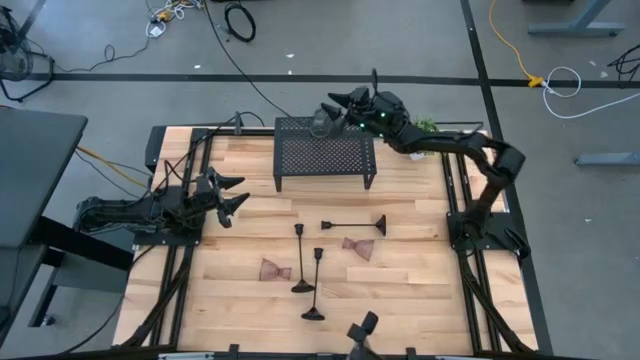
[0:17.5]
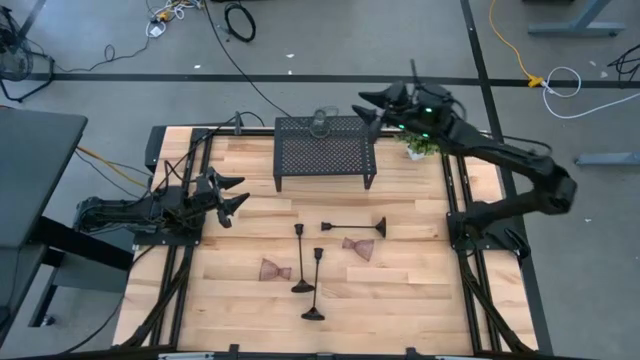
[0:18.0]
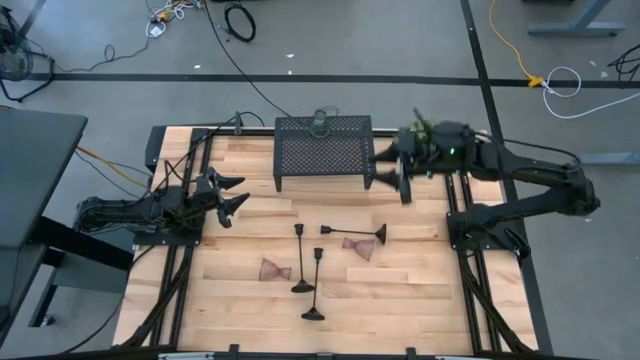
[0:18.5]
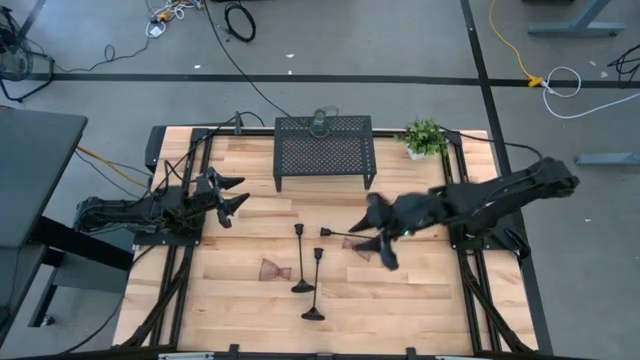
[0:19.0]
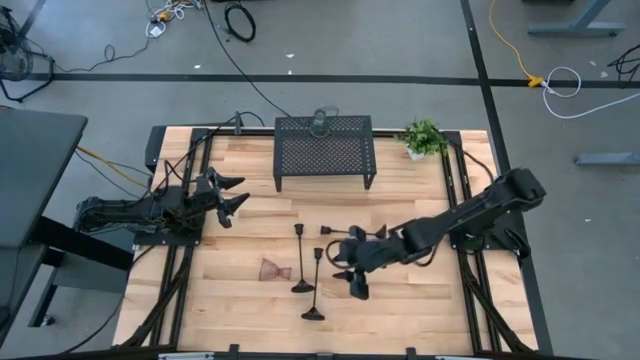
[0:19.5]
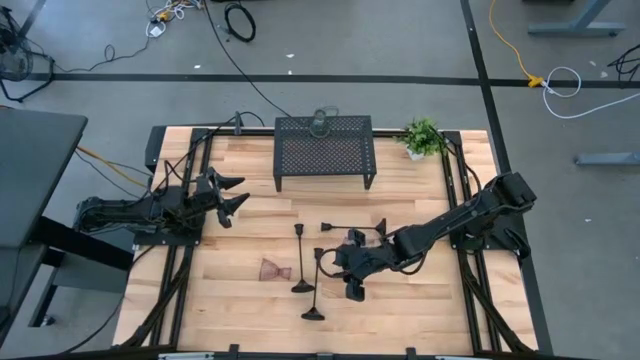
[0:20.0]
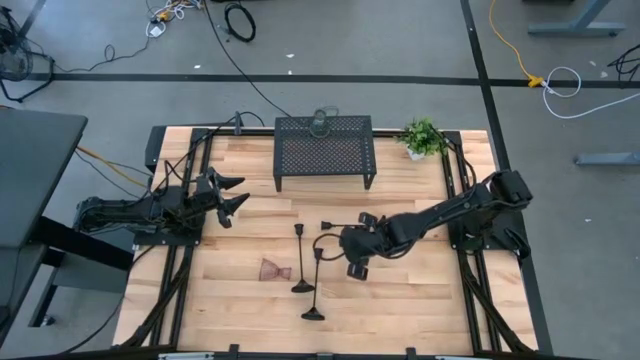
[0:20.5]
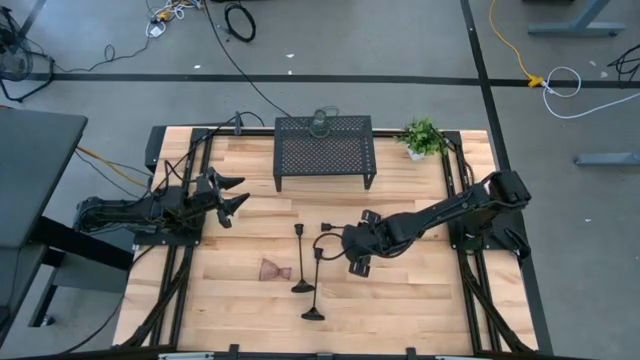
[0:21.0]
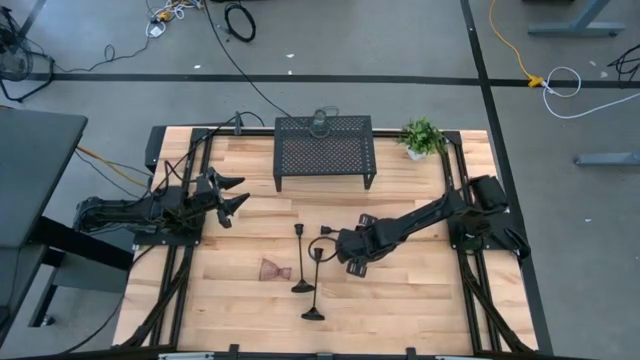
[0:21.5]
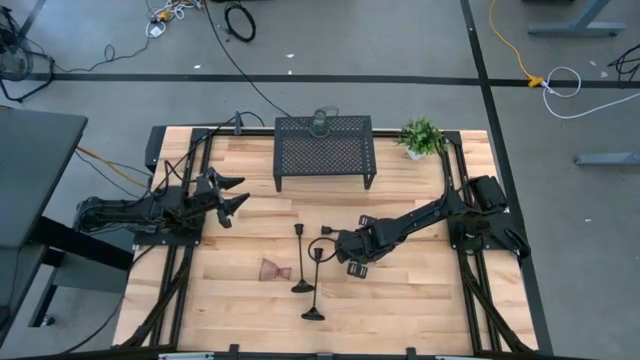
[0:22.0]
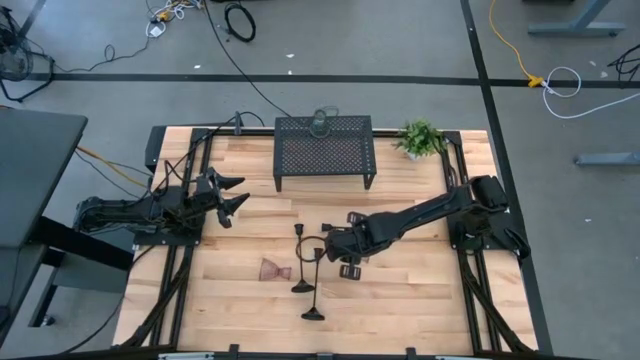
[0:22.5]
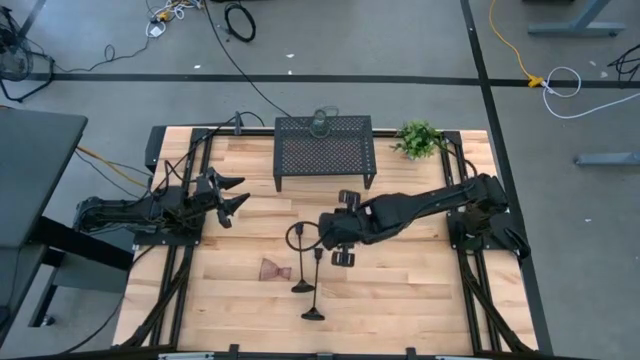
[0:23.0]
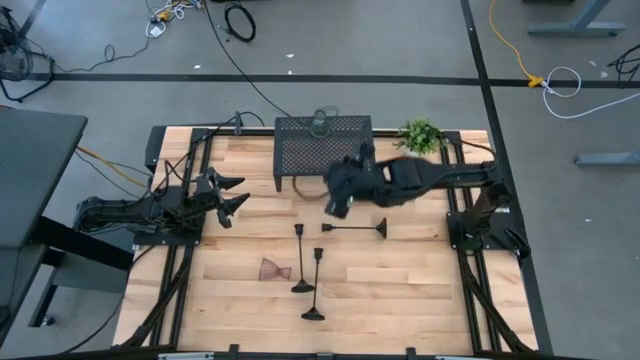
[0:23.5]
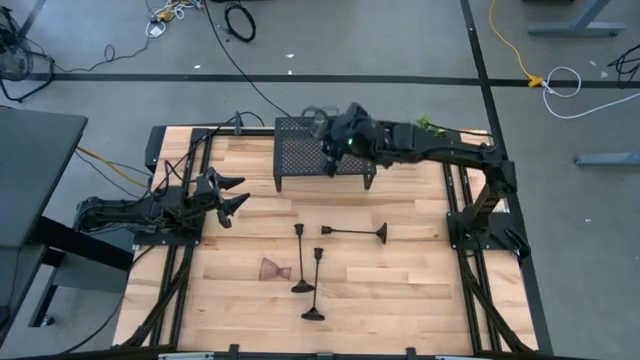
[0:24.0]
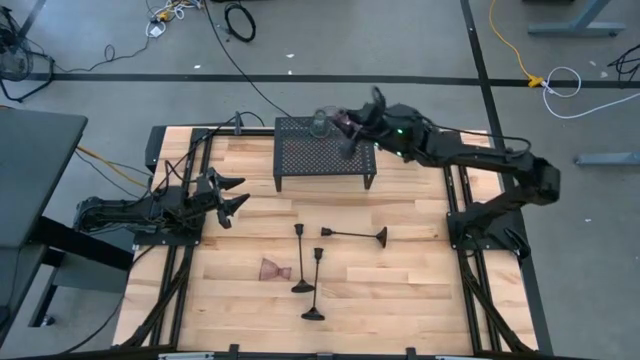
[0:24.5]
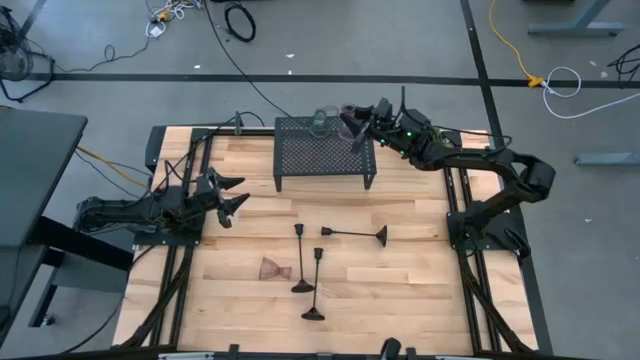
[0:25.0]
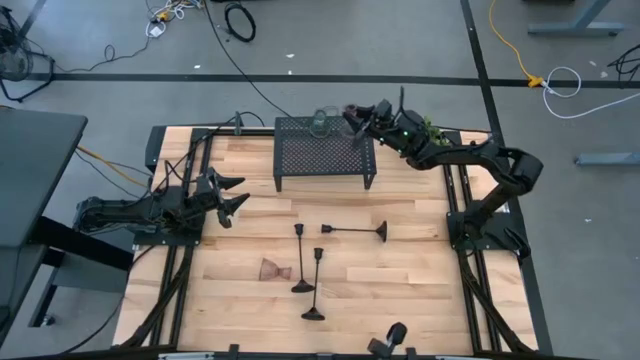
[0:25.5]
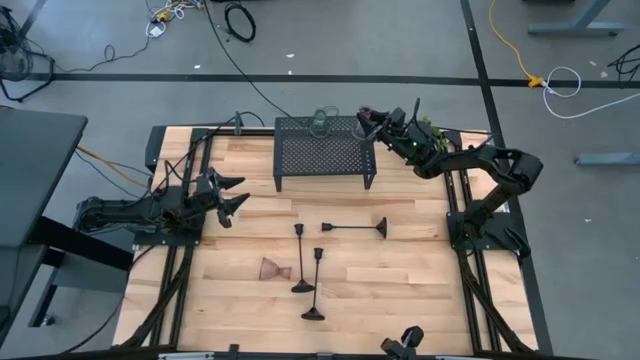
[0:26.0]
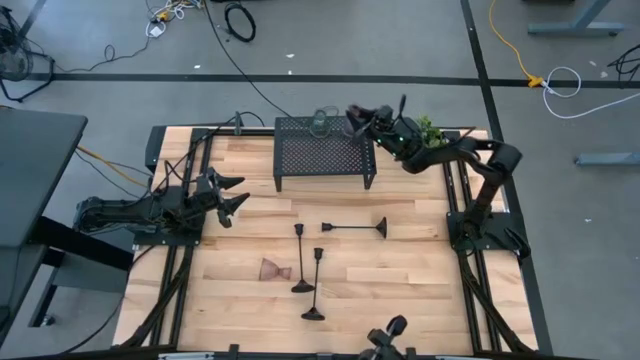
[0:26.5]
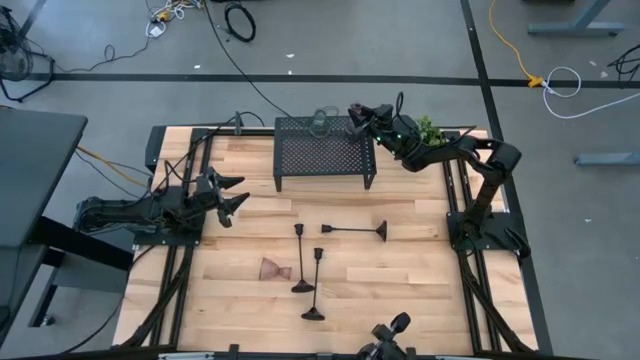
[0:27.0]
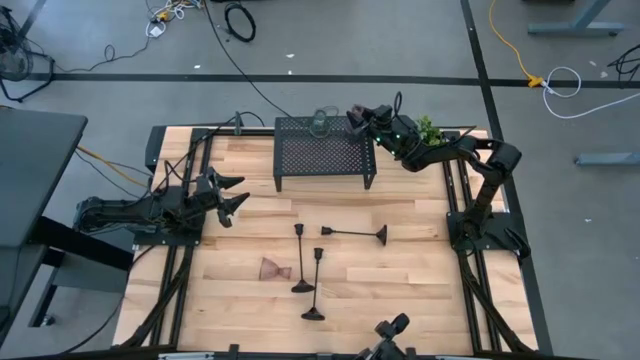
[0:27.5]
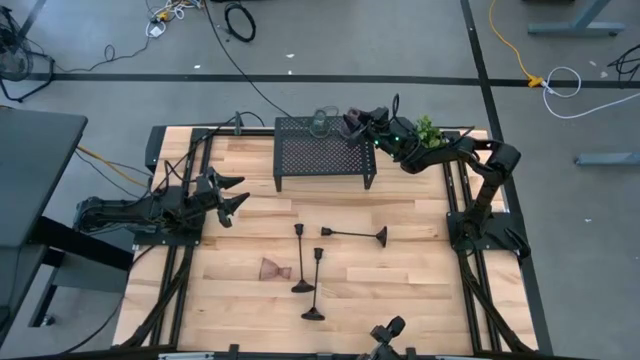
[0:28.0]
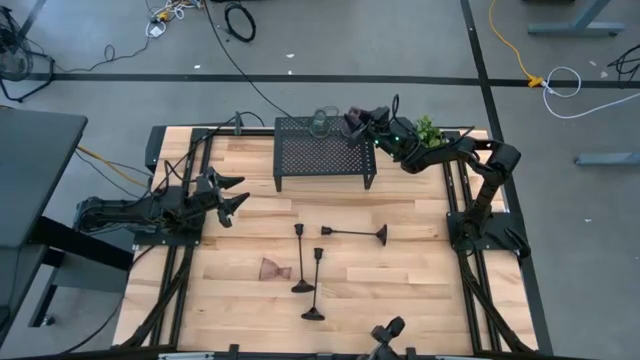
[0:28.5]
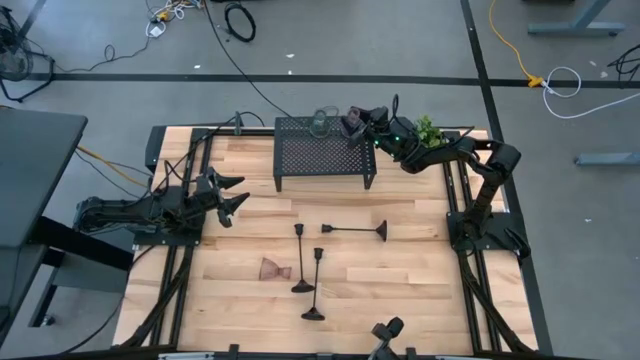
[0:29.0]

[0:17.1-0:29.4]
Task: Pick & Place candle stick holders
Put the right pink glass candle holder on the shelf

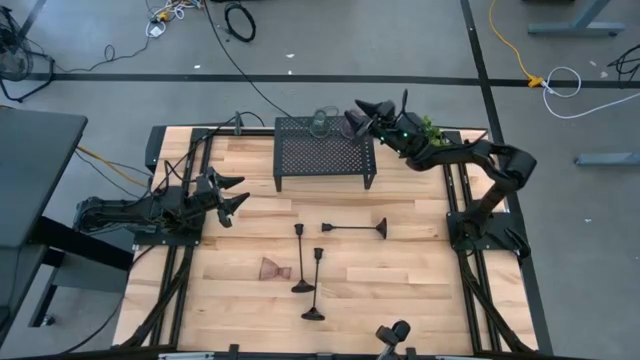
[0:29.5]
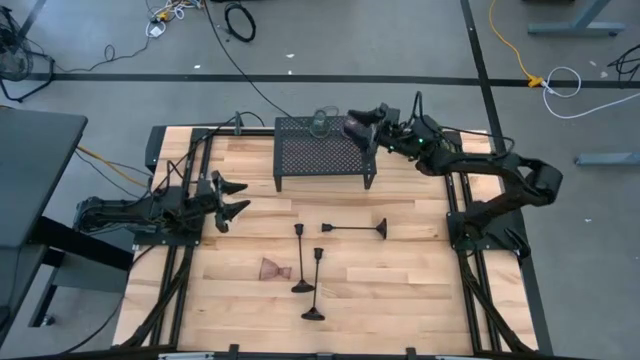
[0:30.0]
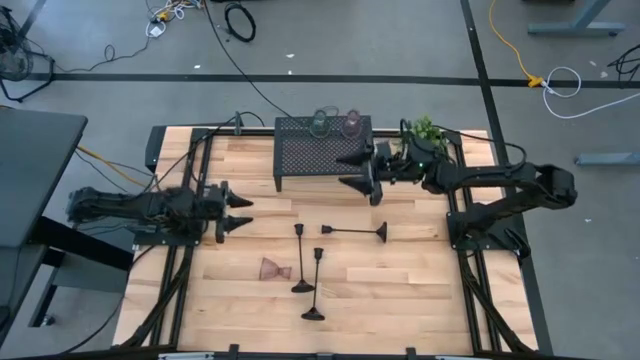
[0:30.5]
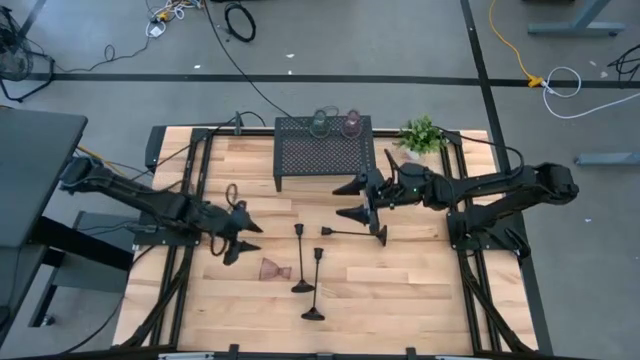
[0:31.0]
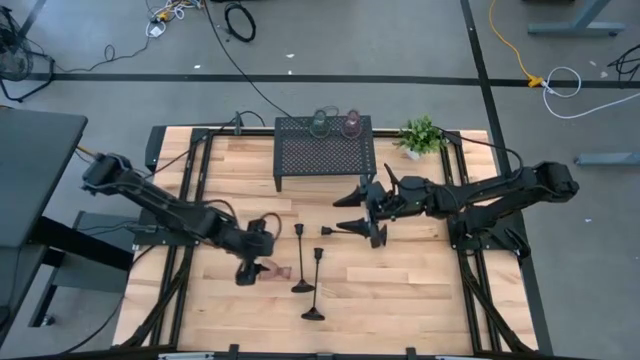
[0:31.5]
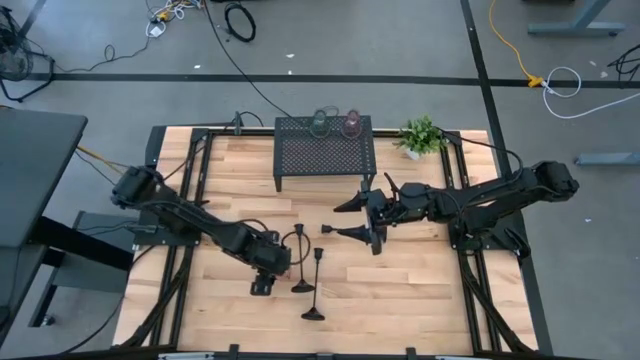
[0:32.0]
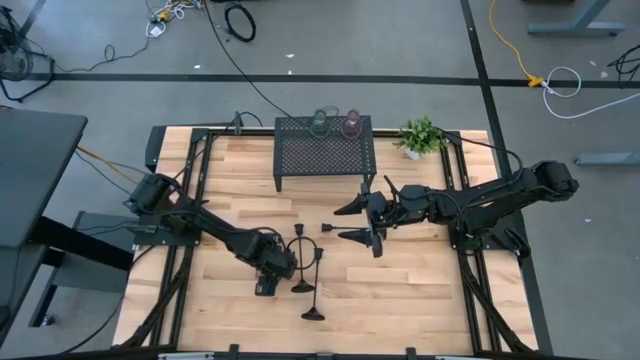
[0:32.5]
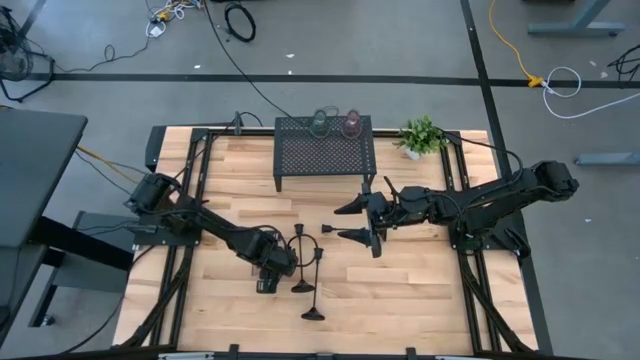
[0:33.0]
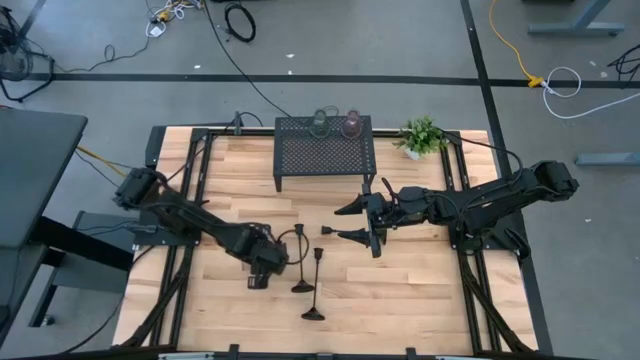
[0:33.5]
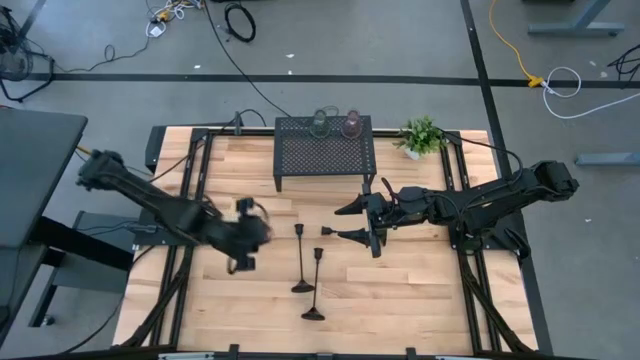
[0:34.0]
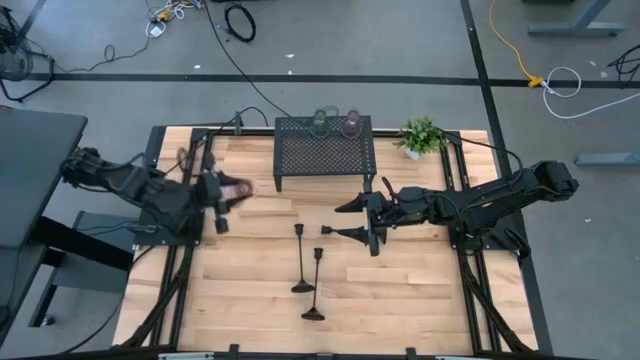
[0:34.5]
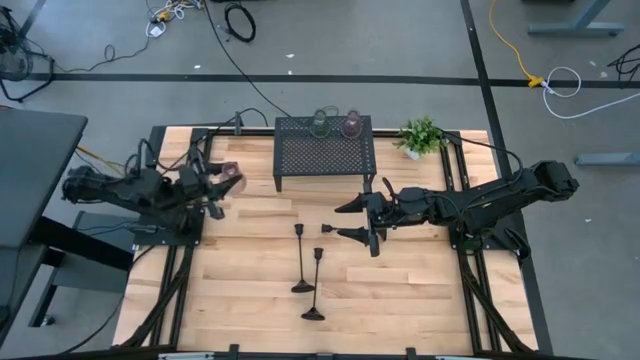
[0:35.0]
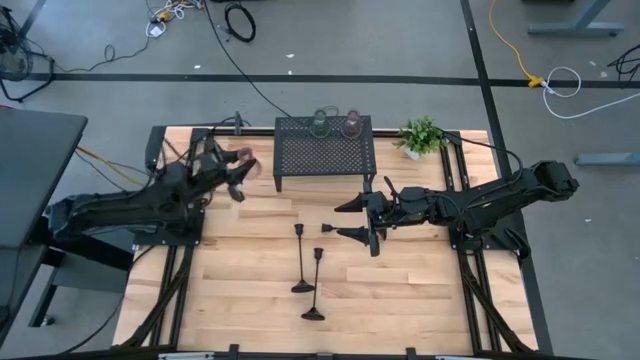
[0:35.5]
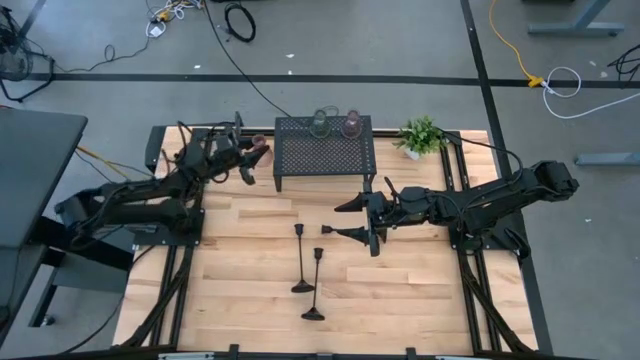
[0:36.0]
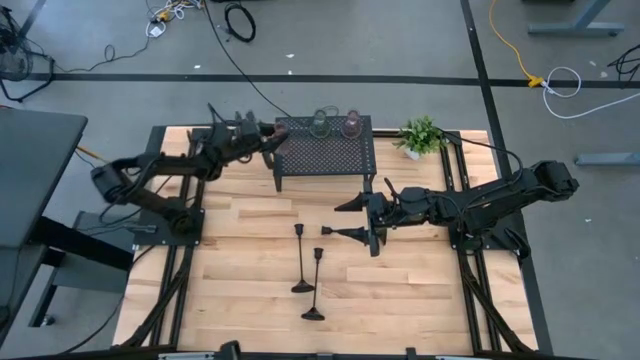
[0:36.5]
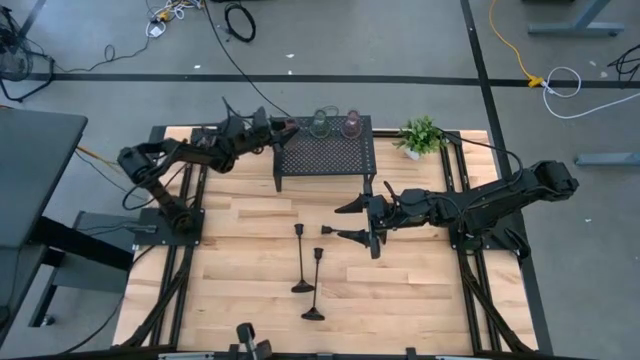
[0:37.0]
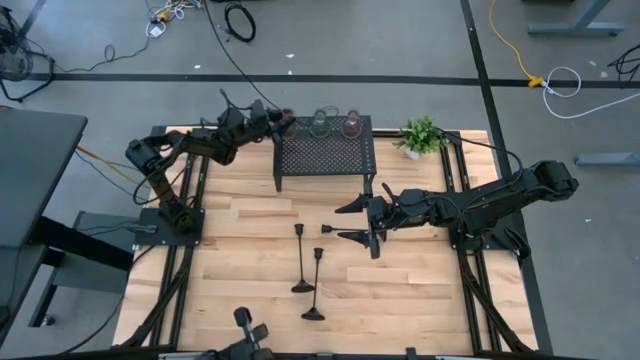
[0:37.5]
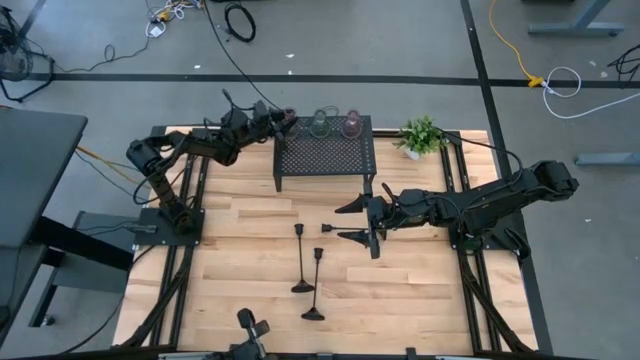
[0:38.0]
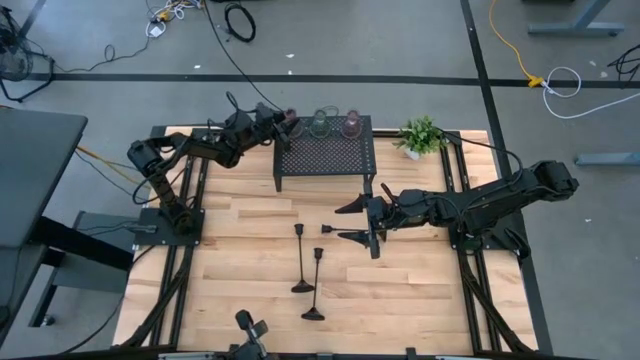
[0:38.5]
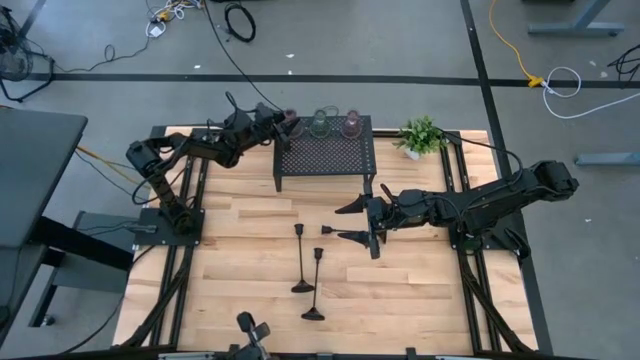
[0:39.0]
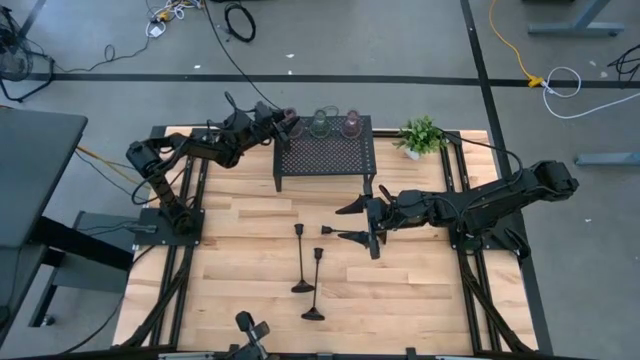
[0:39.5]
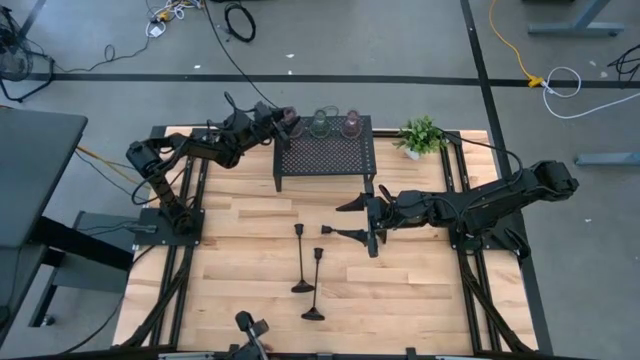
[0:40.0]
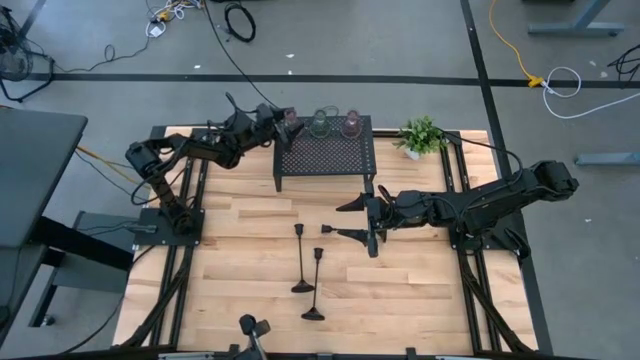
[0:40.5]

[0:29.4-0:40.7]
Put the pink glass candle holder on the shelf
